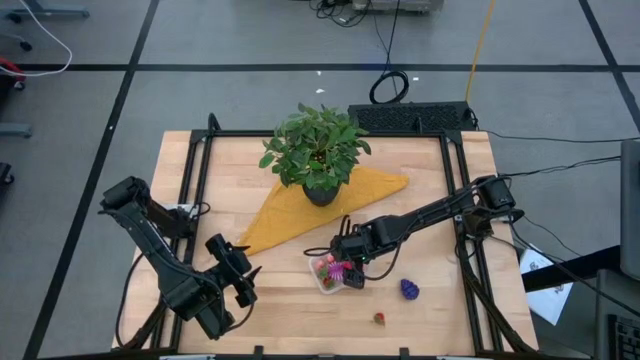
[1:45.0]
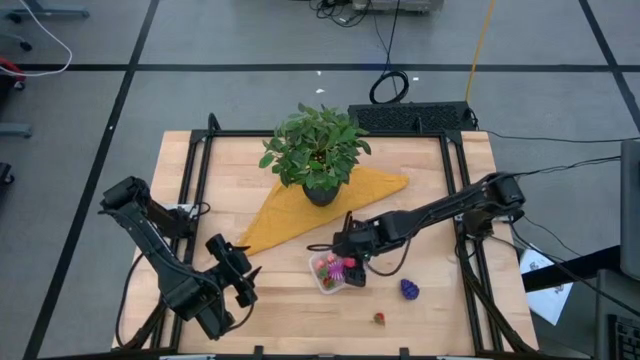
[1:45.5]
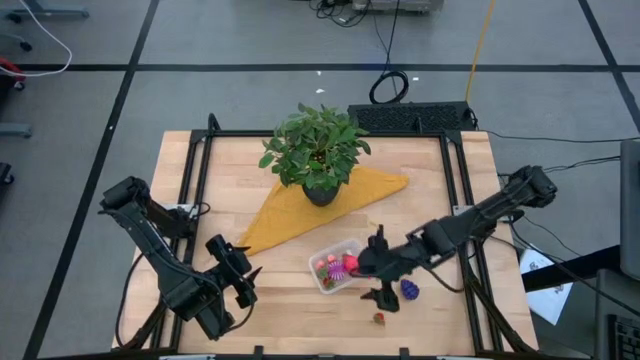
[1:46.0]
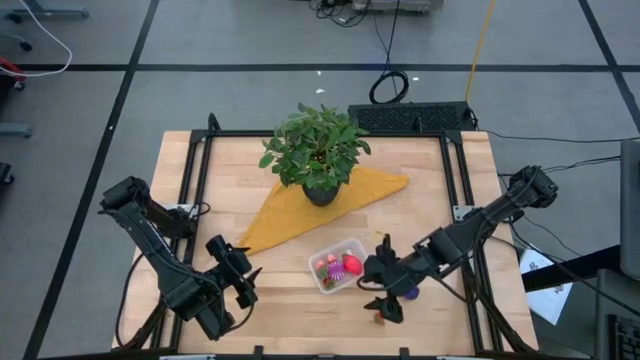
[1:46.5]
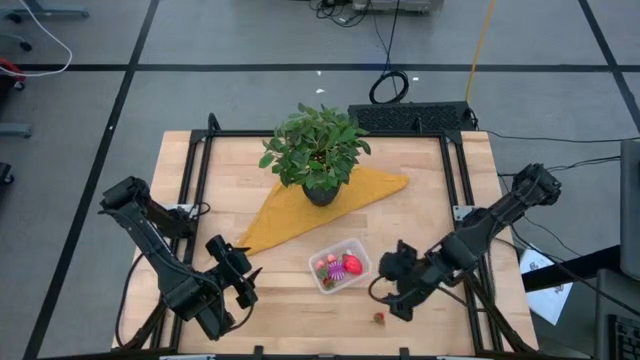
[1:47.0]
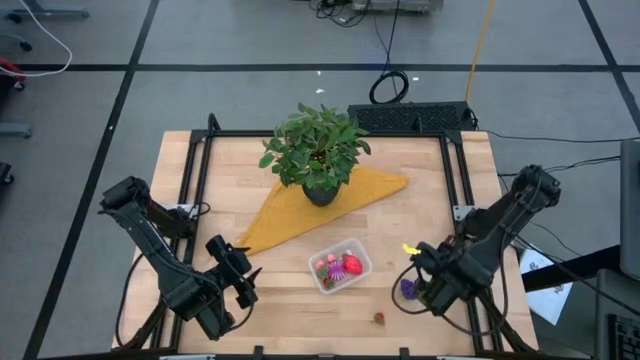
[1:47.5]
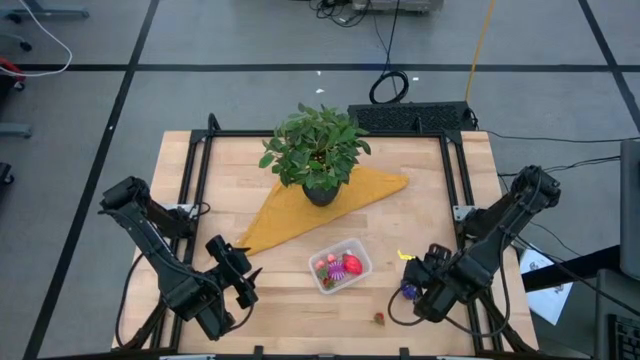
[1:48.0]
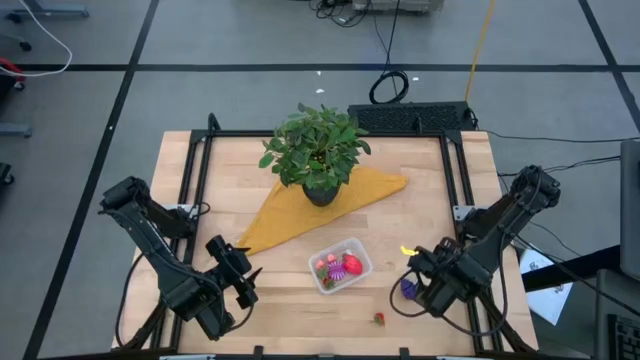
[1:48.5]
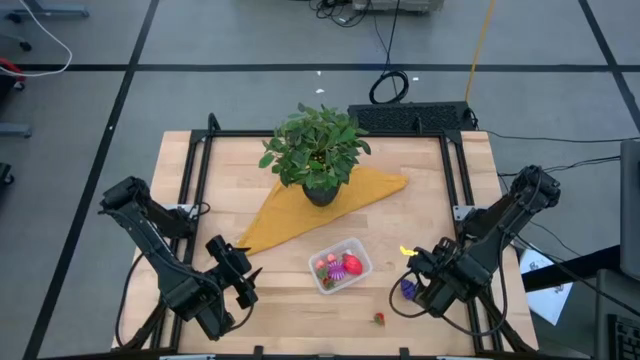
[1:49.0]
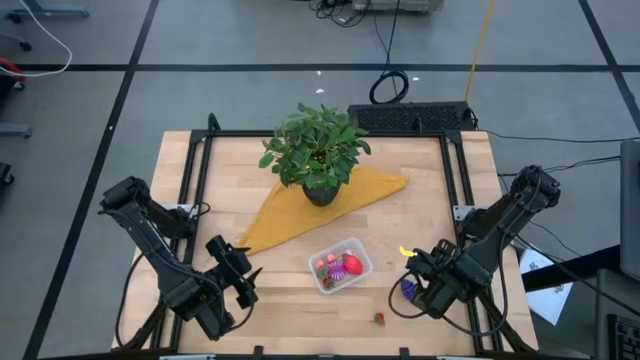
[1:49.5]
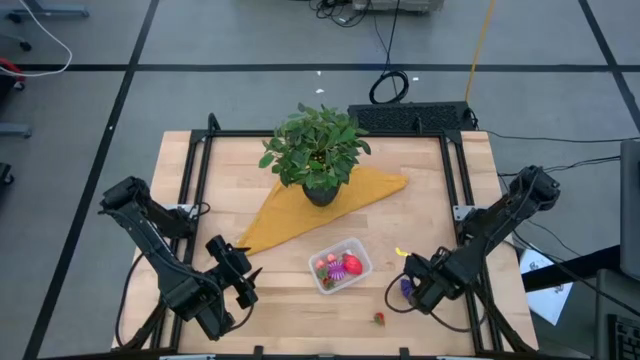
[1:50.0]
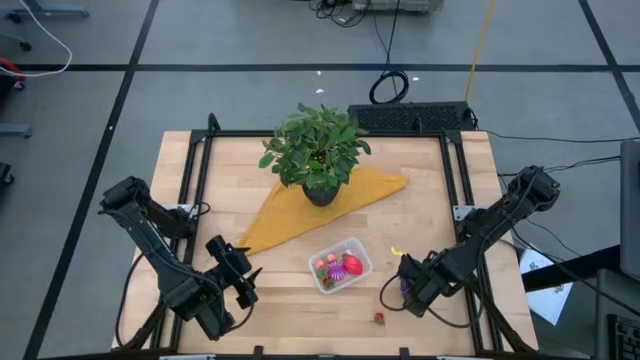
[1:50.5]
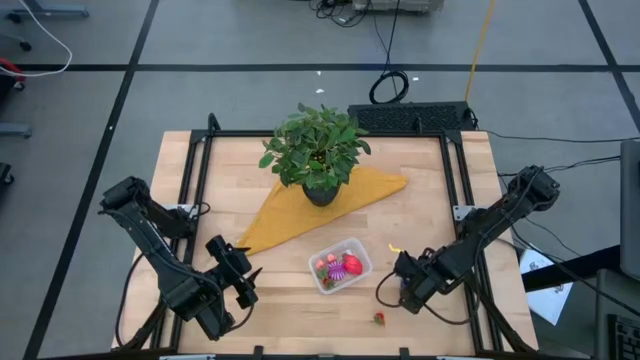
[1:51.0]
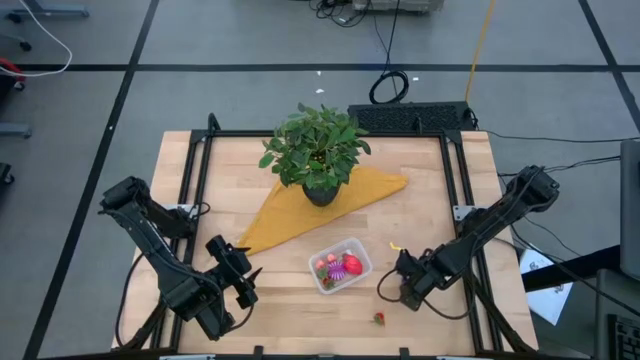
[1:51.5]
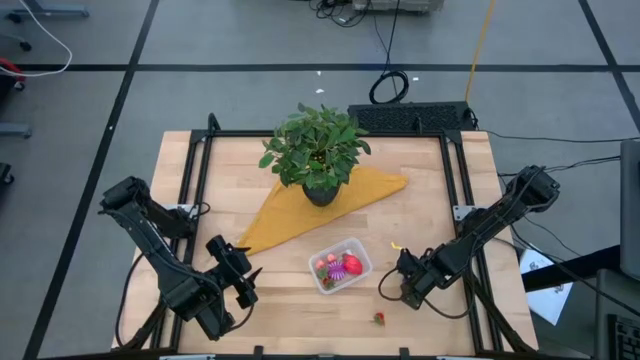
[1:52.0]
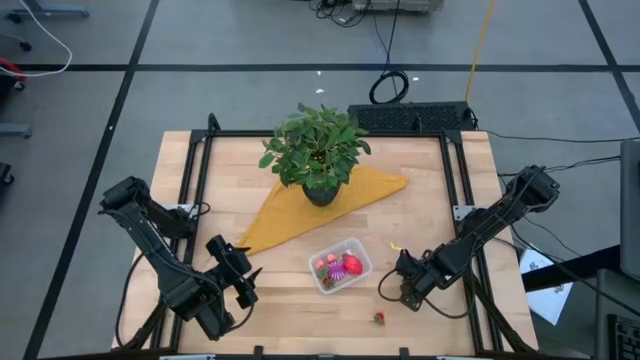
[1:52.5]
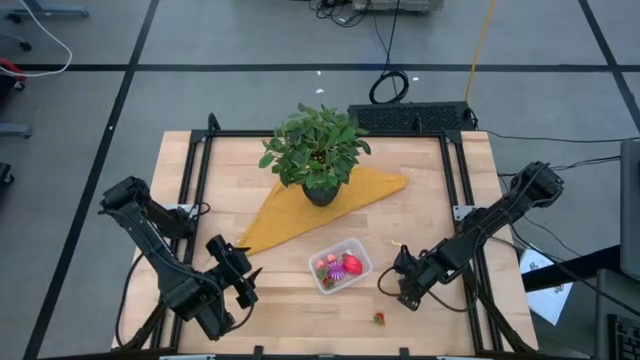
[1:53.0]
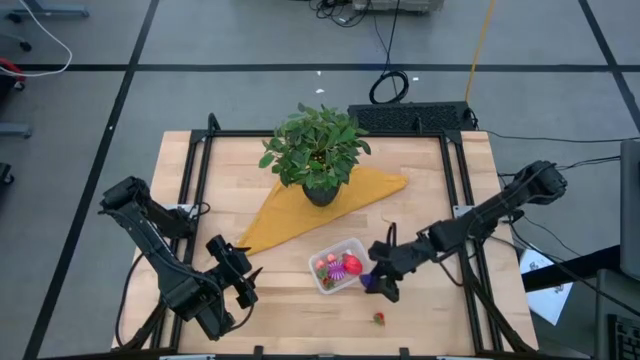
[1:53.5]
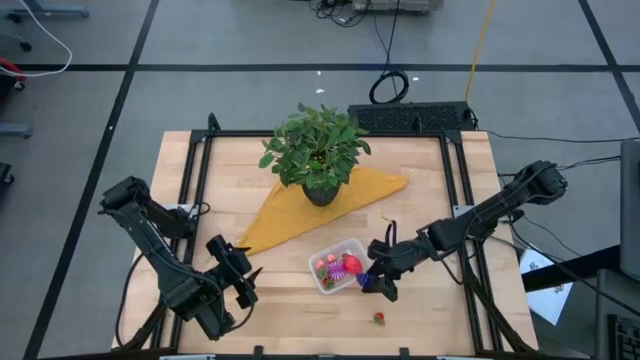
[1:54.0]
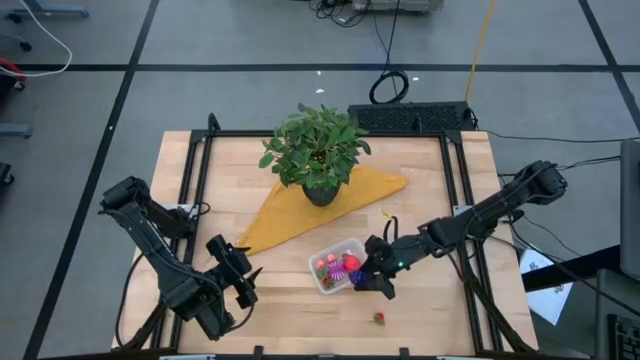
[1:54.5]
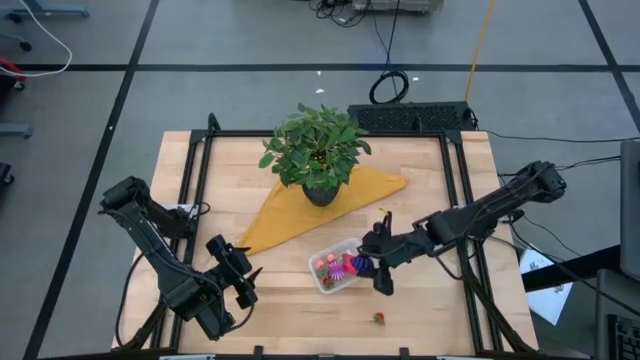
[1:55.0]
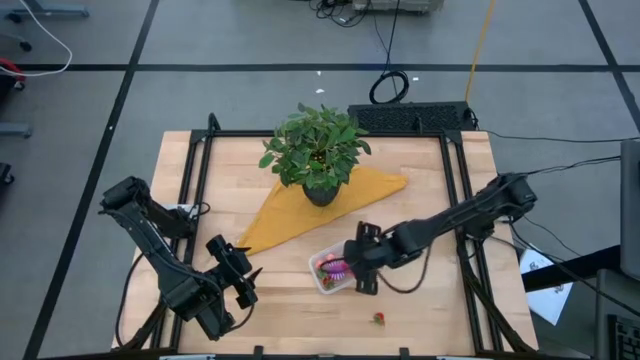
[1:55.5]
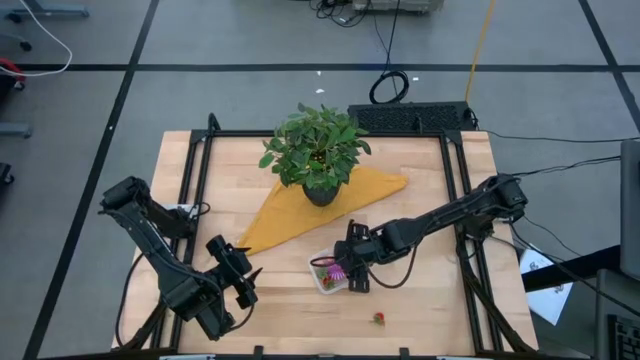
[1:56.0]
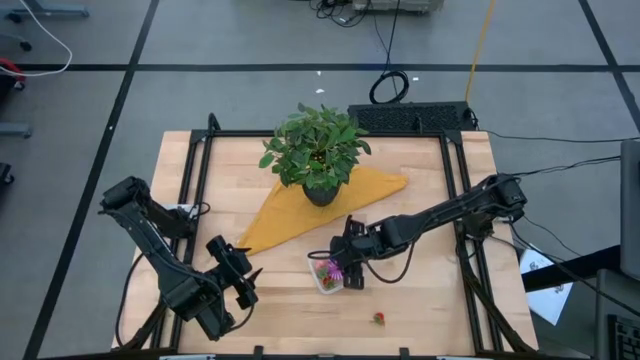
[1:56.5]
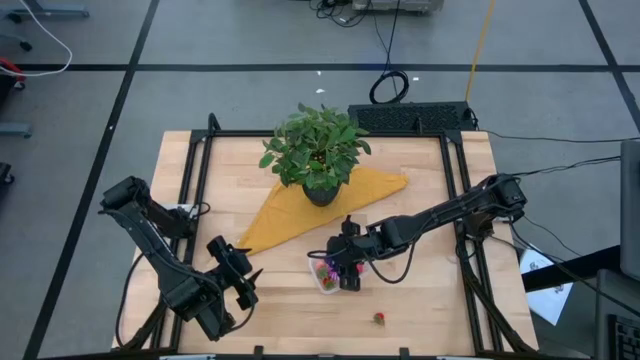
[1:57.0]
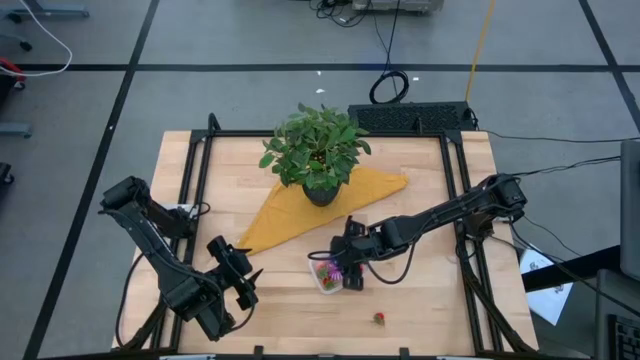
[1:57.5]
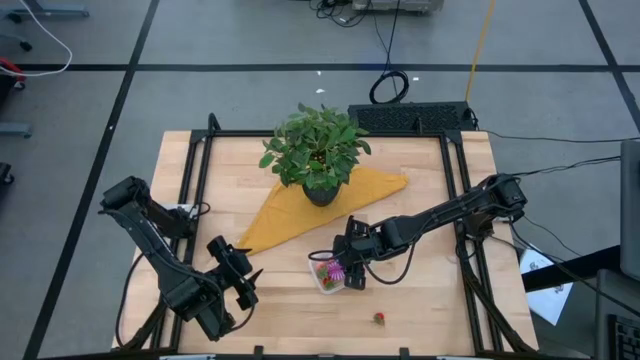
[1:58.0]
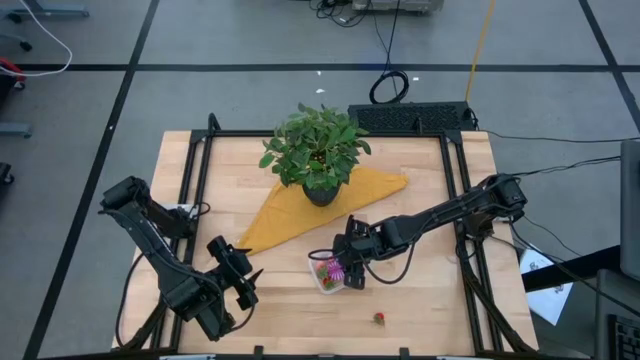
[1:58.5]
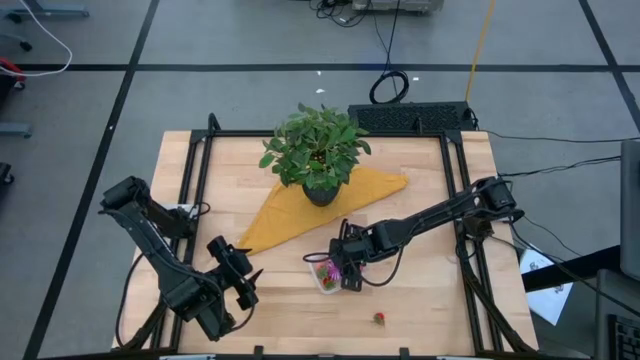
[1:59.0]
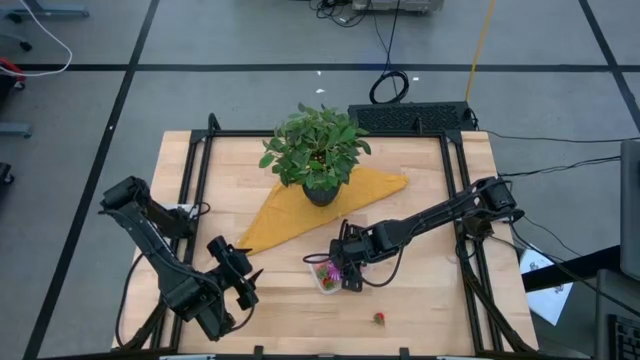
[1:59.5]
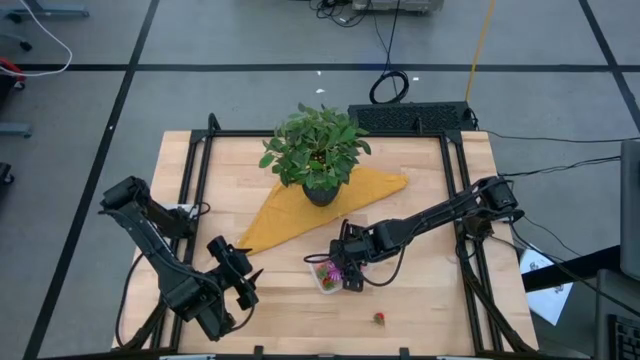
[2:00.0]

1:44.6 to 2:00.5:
Task: Pick and placing Produce into tupperware
Put the grapes into the transparent bin

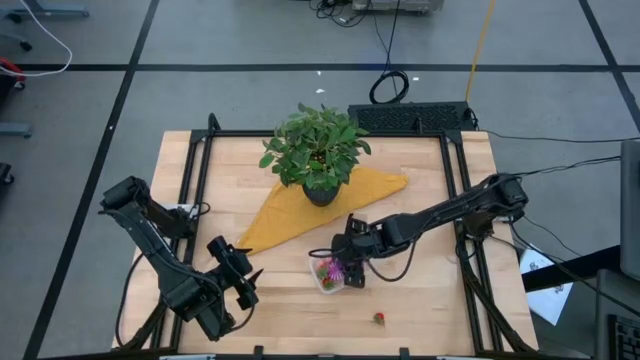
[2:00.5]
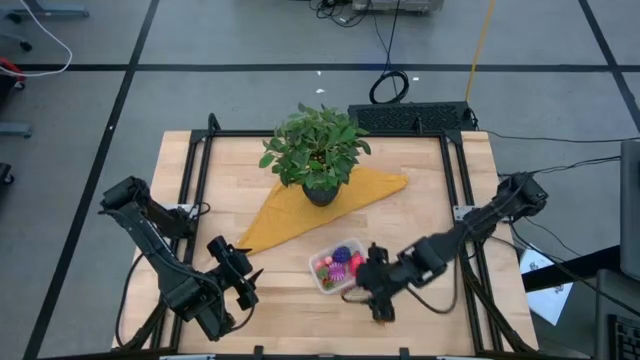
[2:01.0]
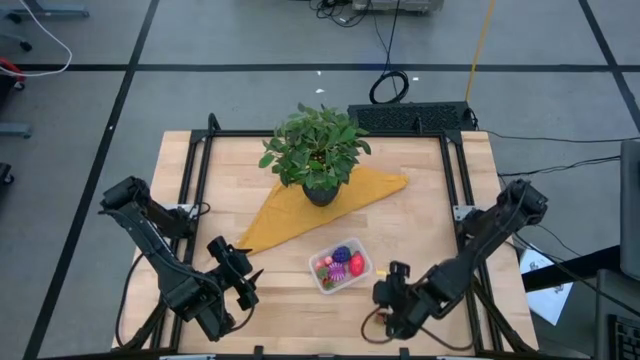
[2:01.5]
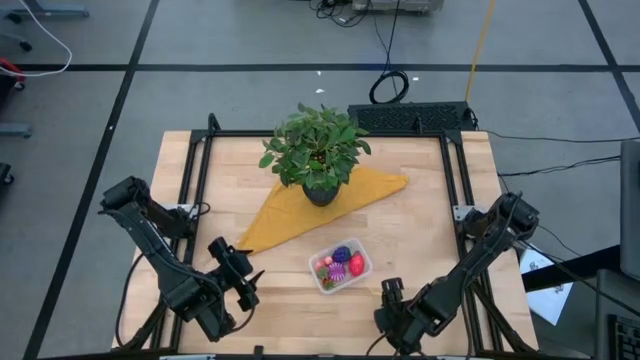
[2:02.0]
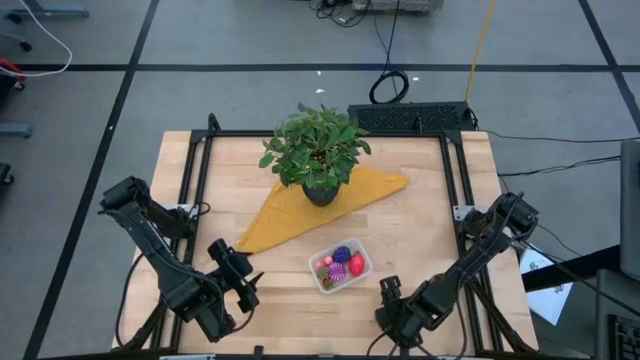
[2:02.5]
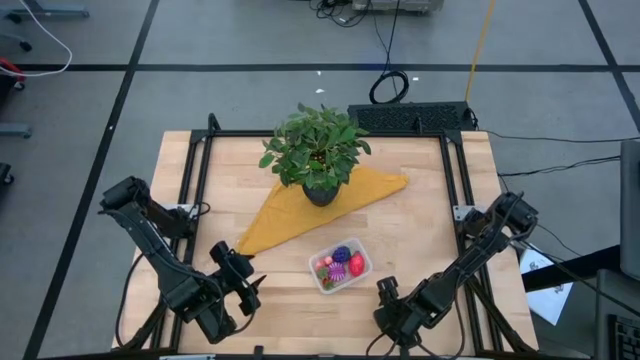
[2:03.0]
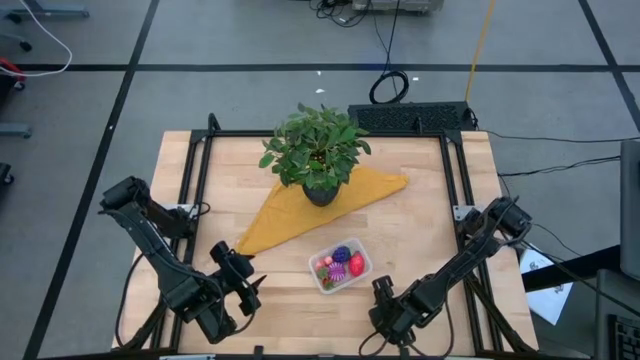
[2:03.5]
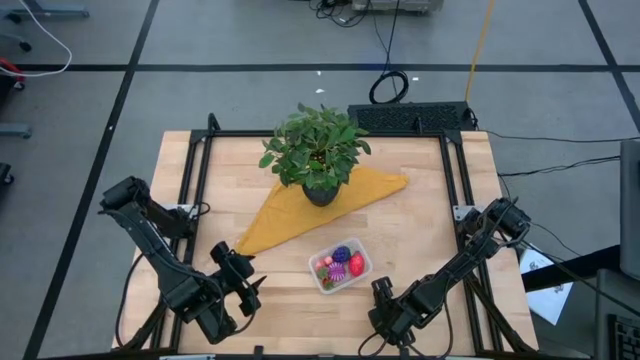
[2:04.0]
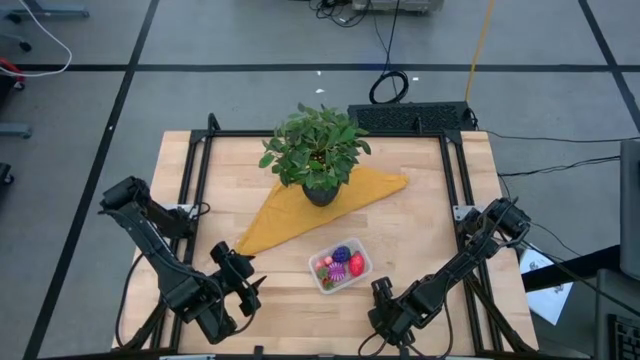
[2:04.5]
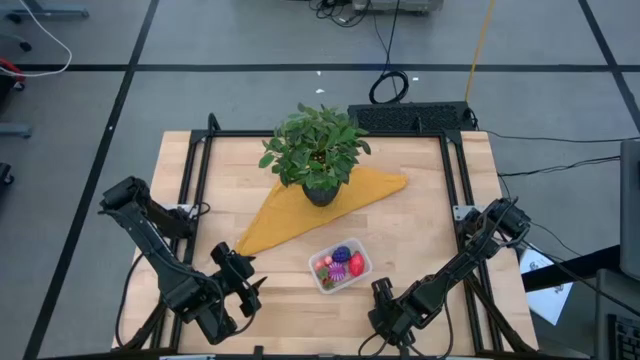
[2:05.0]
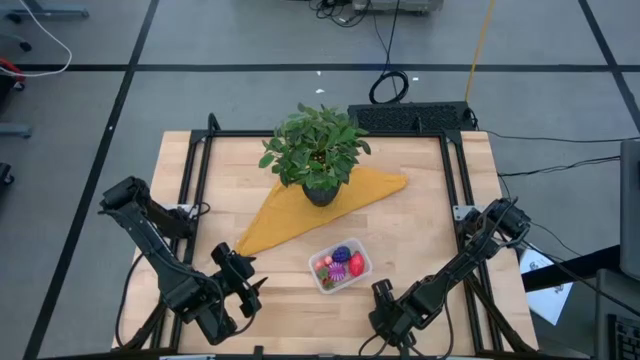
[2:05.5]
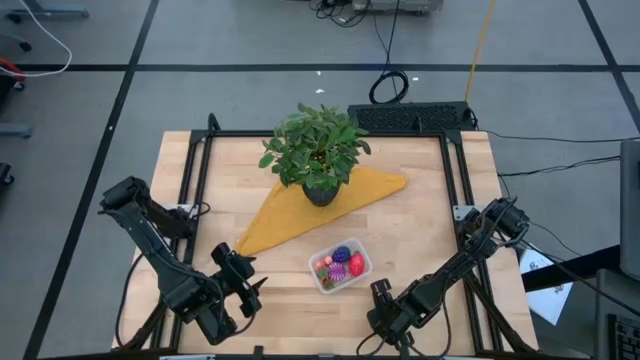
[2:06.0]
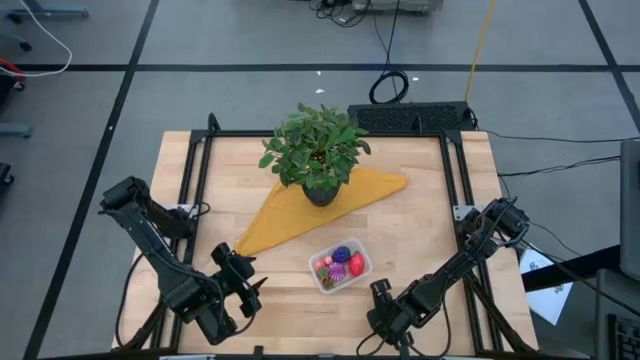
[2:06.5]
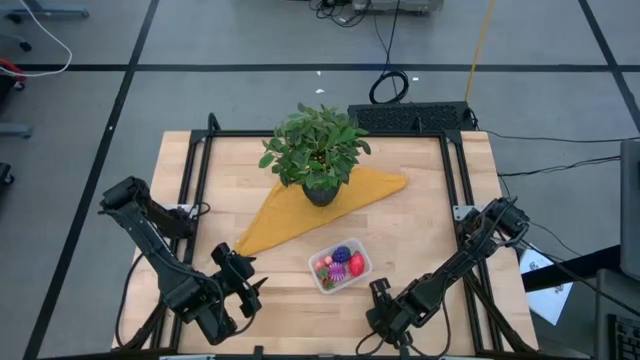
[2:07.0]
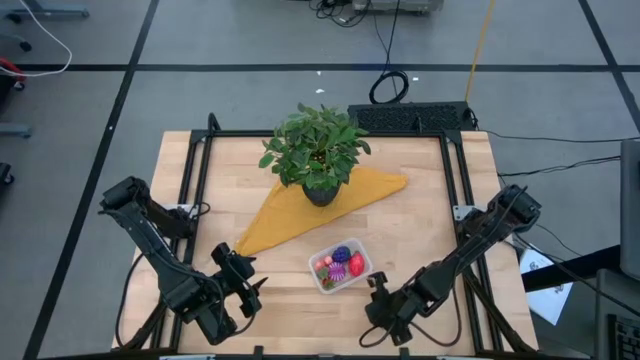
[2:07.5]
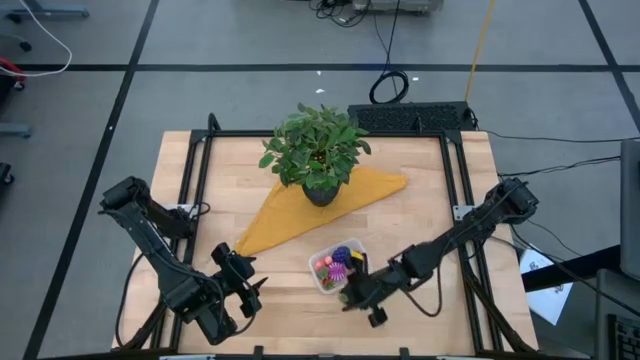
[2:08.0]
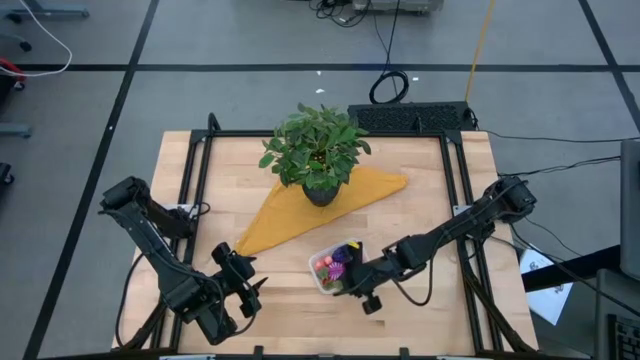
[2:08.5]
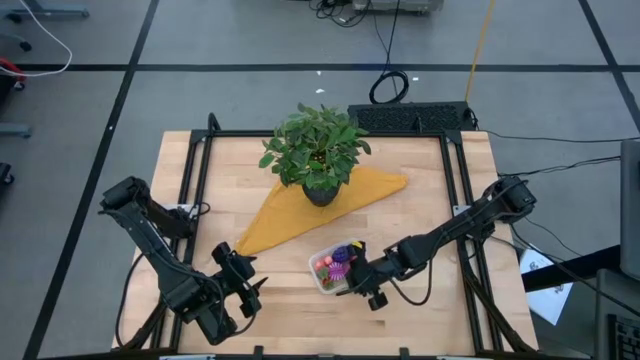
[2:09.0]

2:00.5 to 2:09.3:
Put the strawberry into the transparent bin
